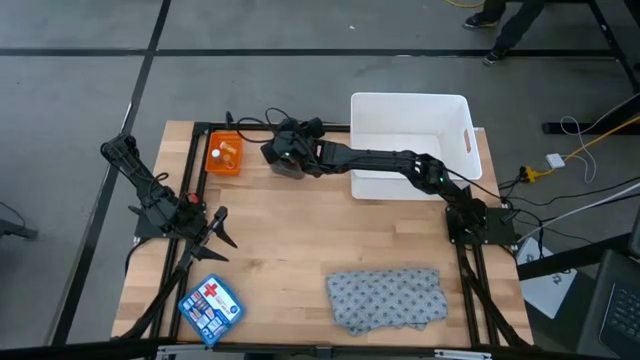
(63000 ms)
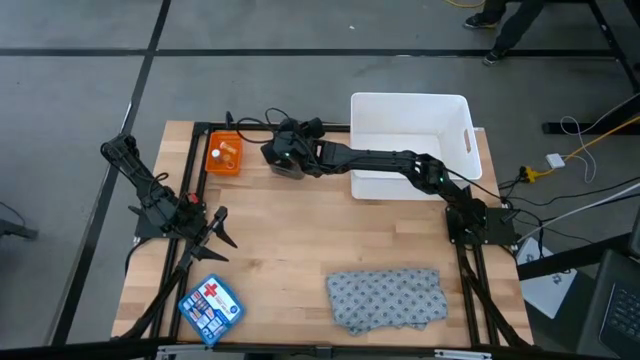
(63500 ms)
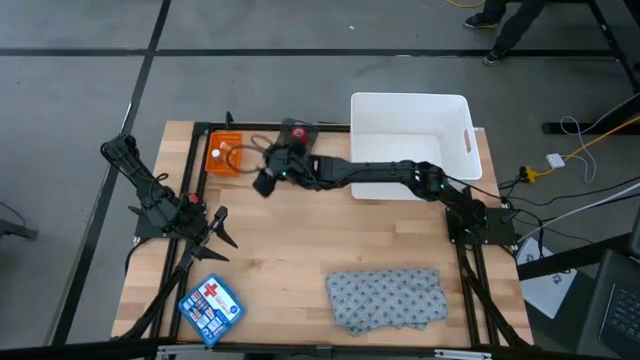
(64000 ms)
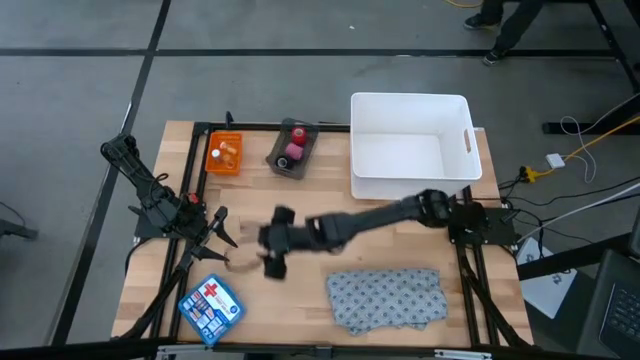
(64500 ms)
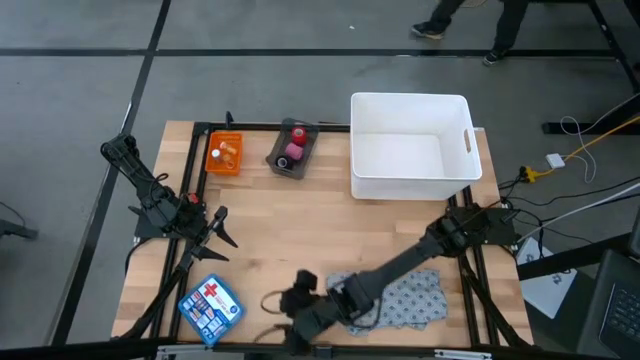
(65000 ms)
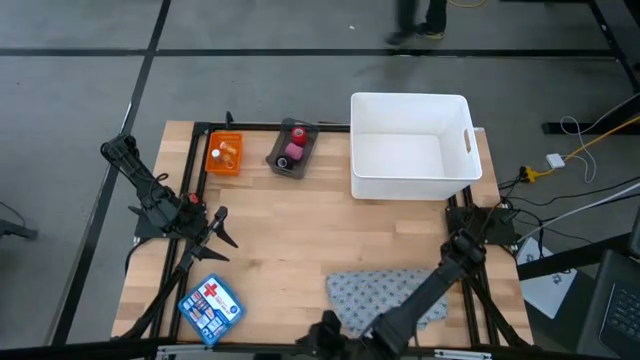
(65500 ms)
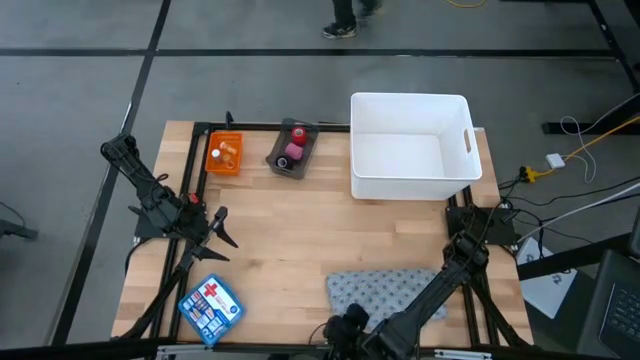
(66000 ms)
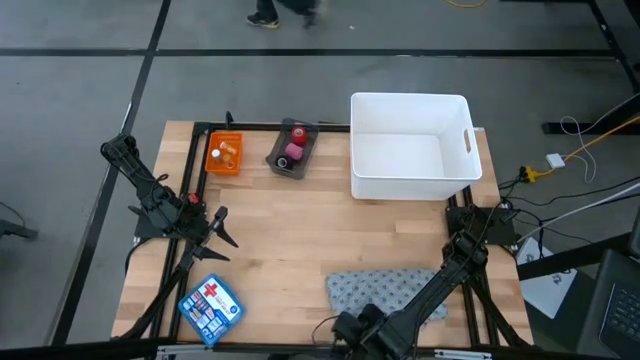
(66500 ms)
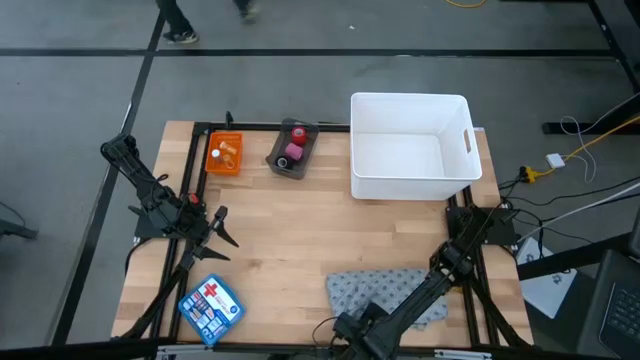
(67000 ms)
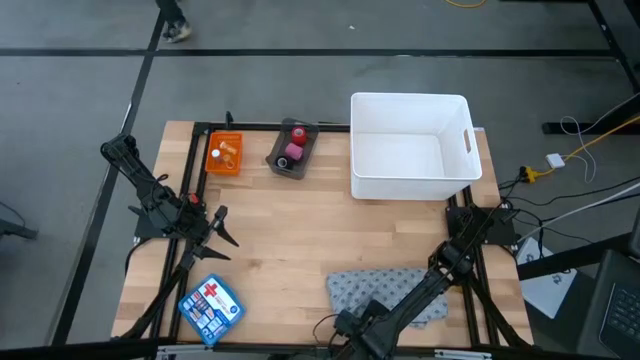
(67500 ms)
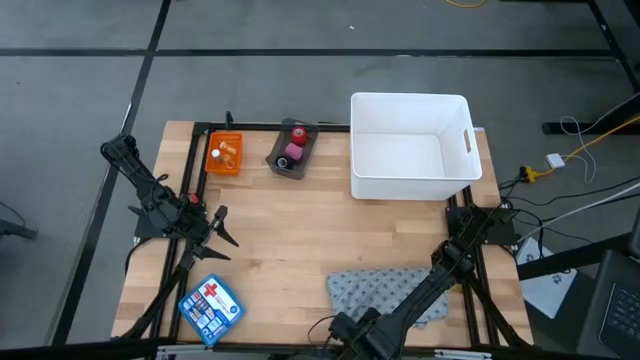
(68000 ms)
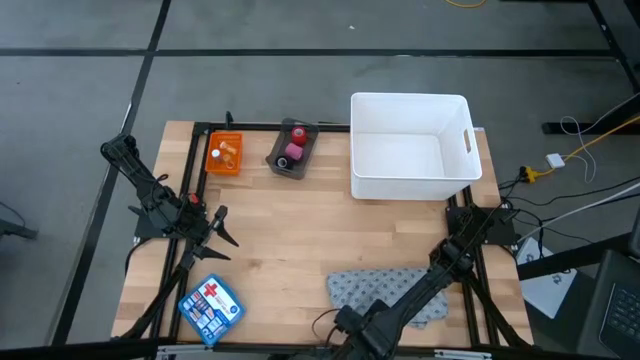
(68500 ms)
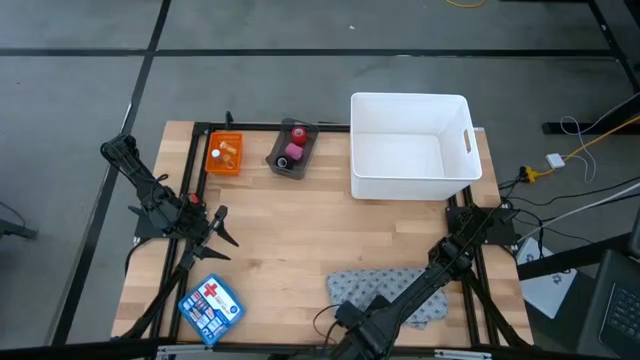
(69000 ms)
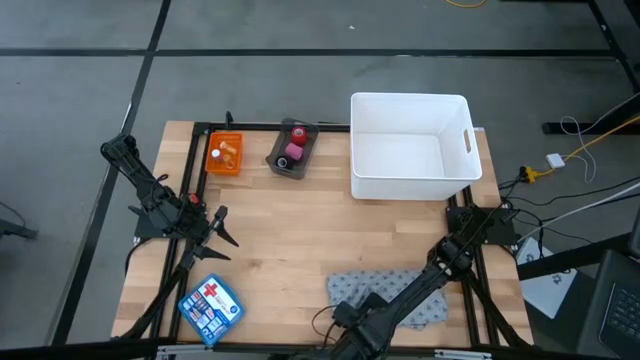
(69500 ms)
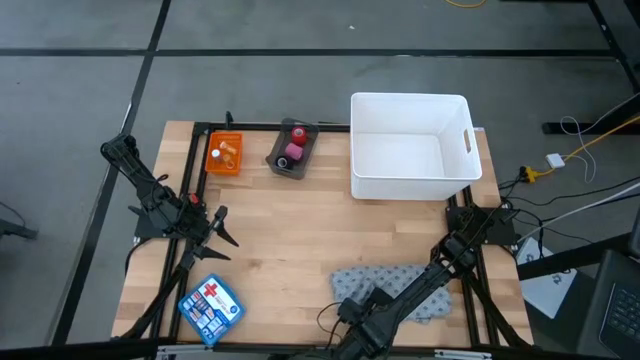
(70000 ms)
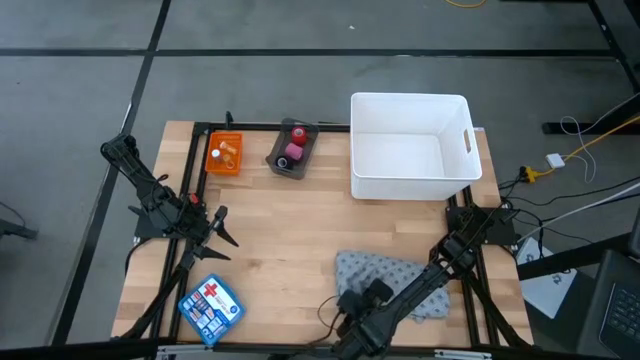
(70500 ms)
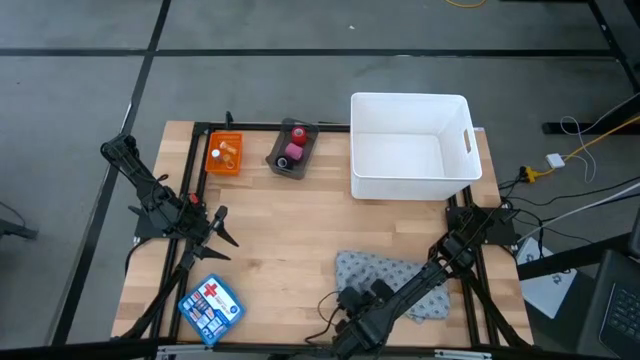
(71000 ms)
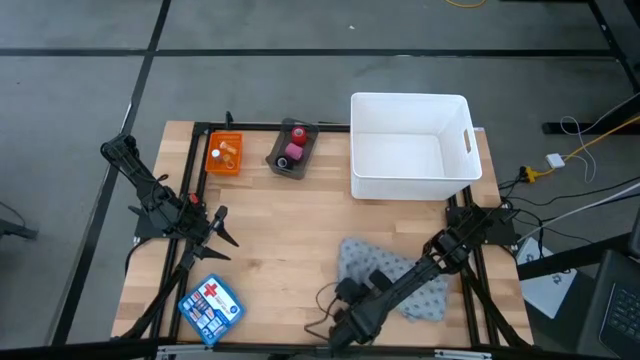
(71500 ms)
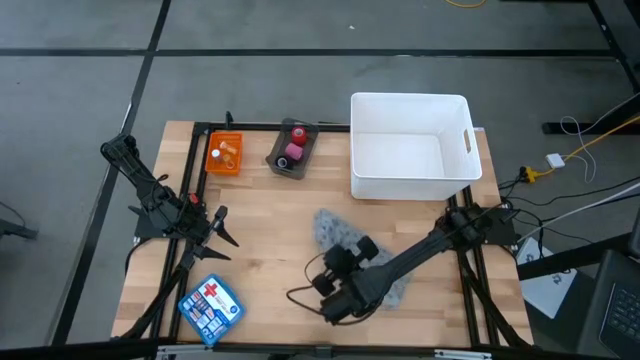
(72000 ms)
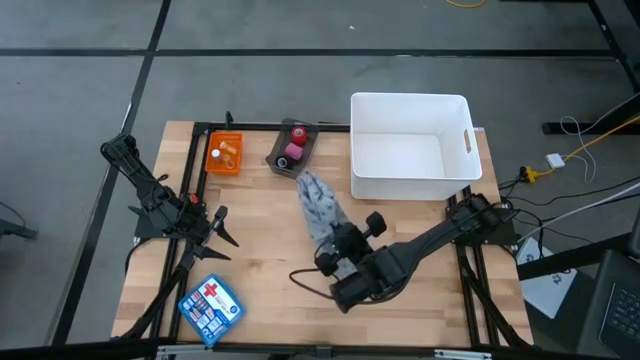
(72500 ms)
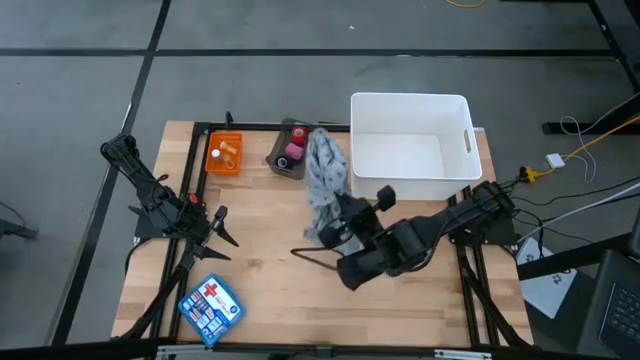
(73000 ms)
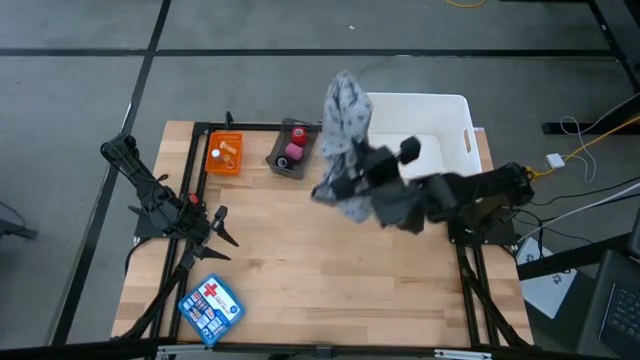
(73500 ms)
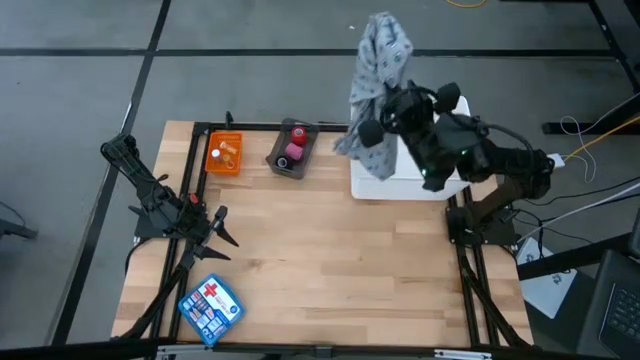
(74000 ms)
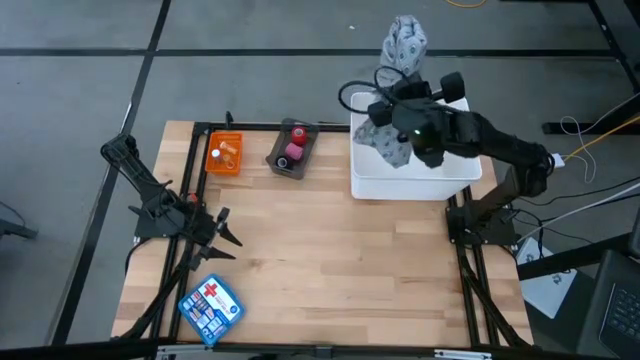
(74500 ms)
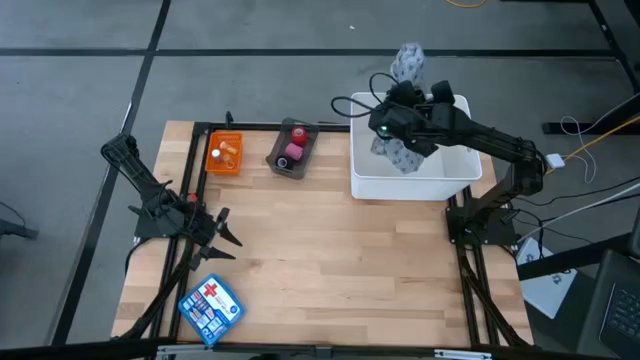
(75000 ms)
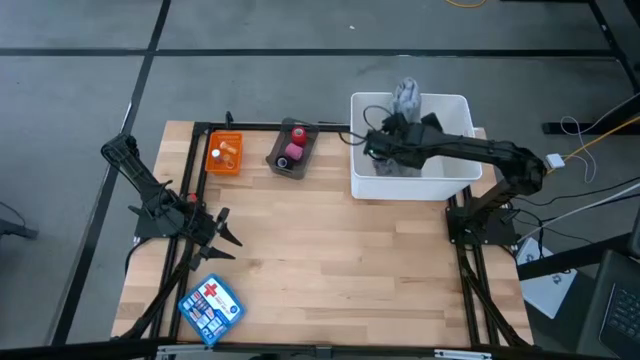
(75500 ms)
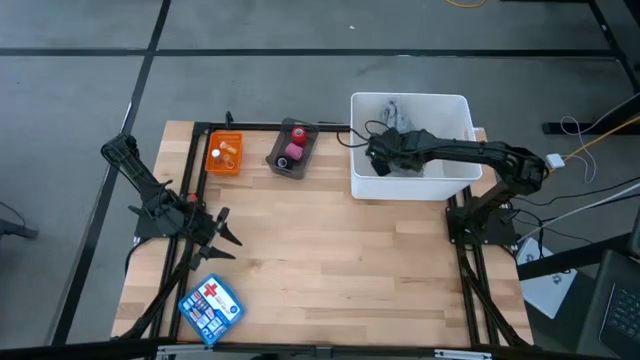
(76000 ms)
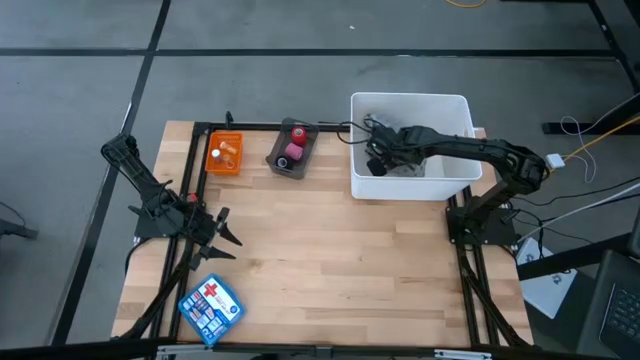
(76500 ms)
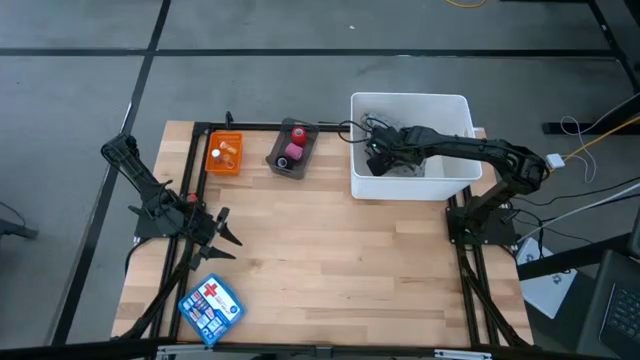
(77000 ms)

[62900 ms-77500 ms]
Task: Pick & place medical supplies in basket/bin
Put the blue patient gown into the white bin

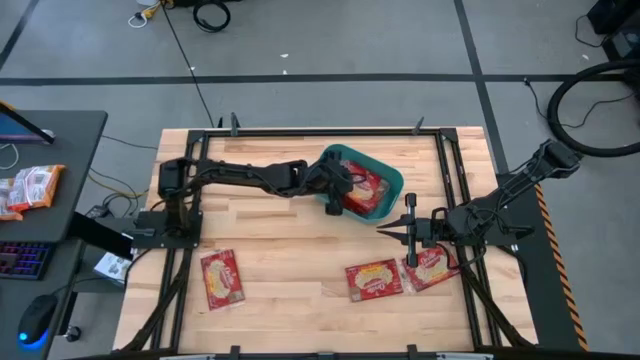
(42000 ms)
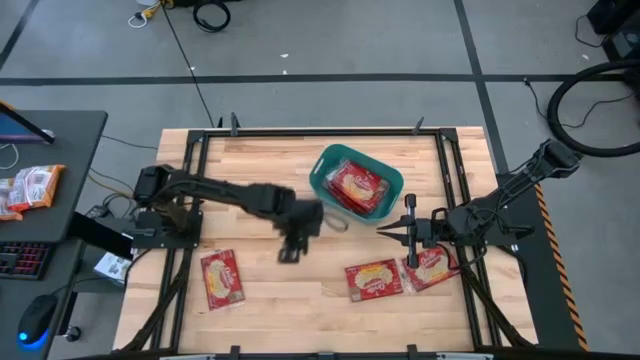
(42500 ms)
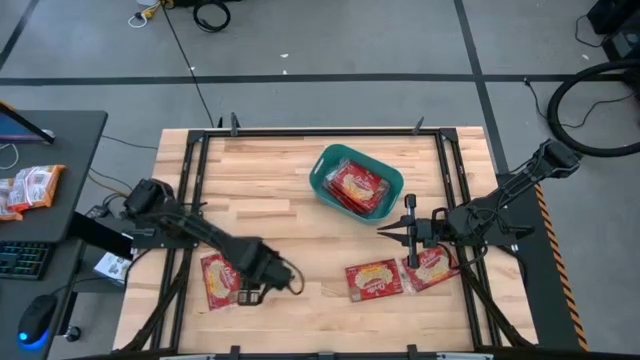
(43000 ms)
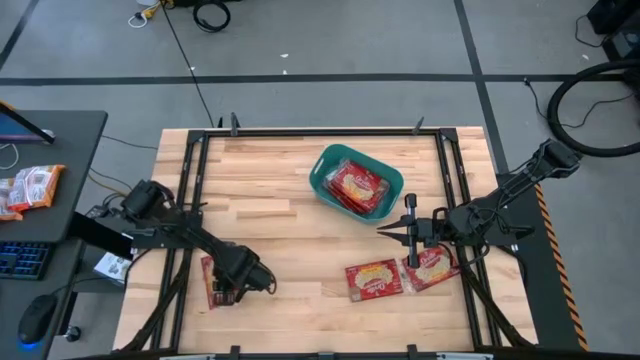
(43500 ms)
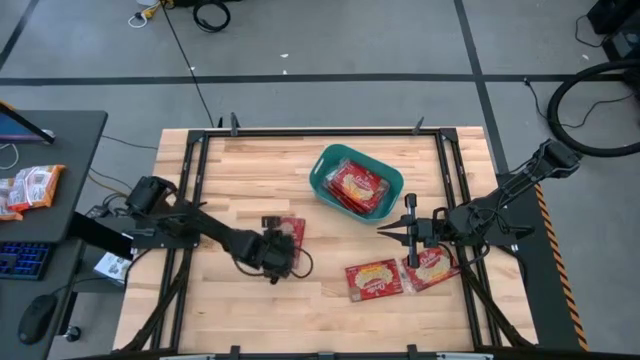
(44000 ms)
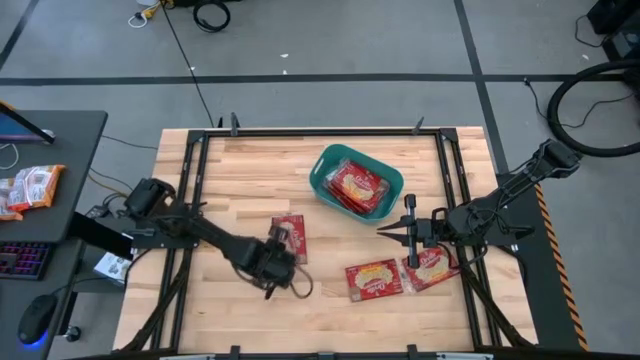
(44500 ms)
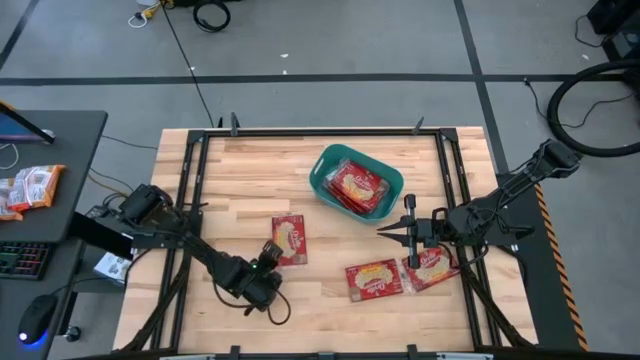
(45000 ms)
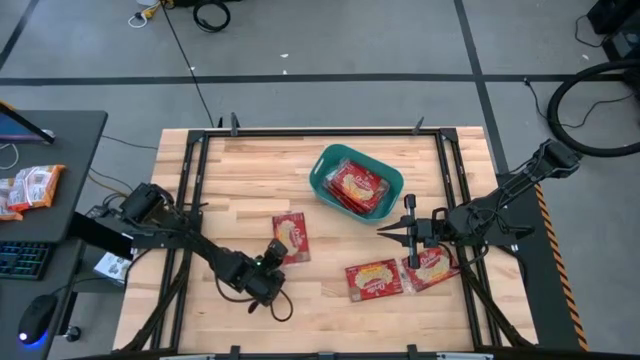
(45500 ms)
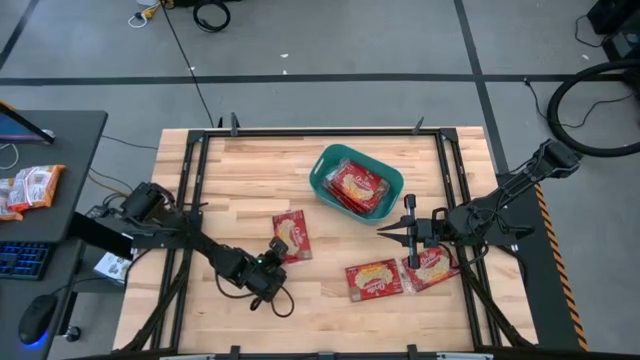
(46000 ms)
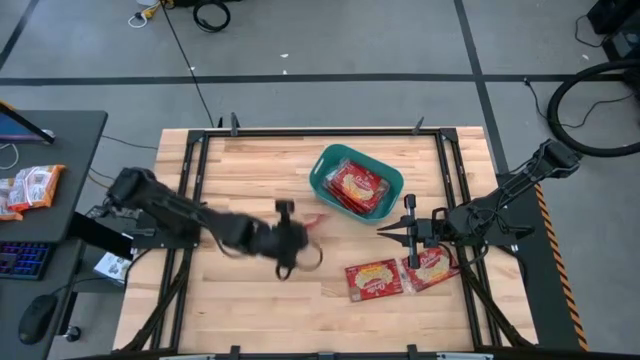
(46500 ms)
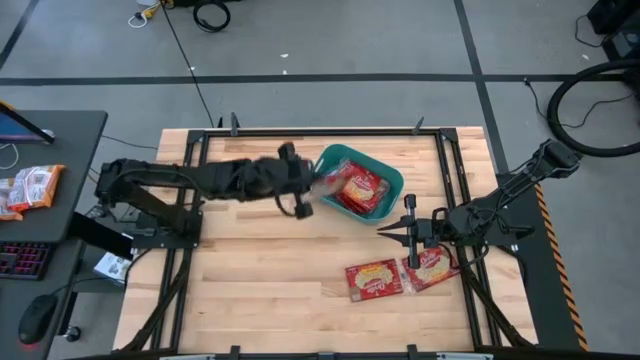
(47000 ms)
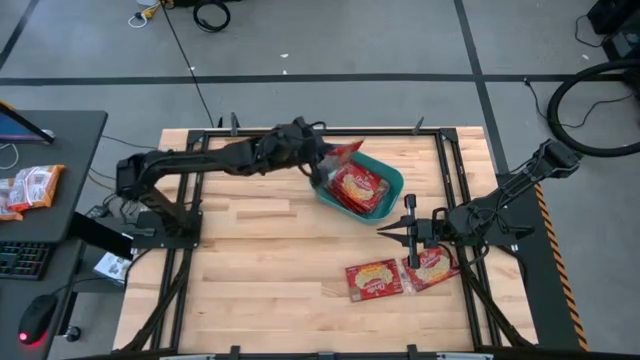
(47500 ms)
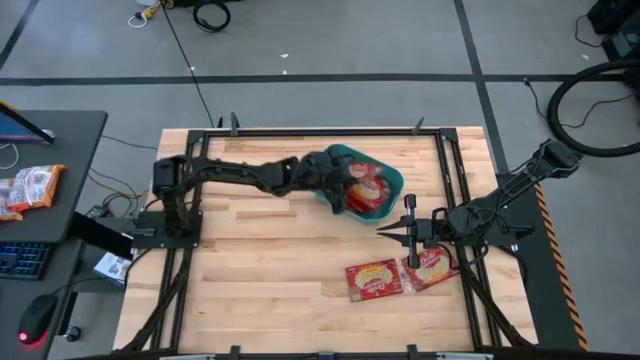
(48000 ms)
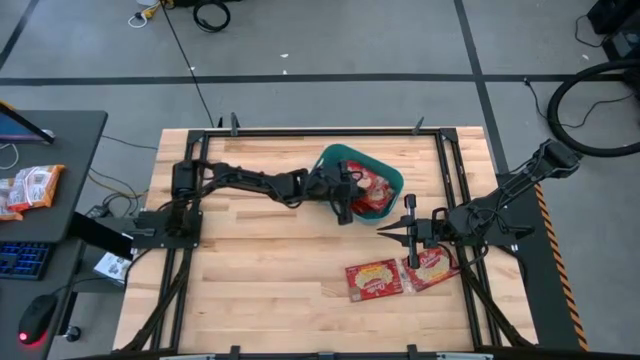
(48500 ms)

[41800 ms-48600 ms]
Task: Sort popcorn bags into baskets
Put the left red popcorn bag into the green bin

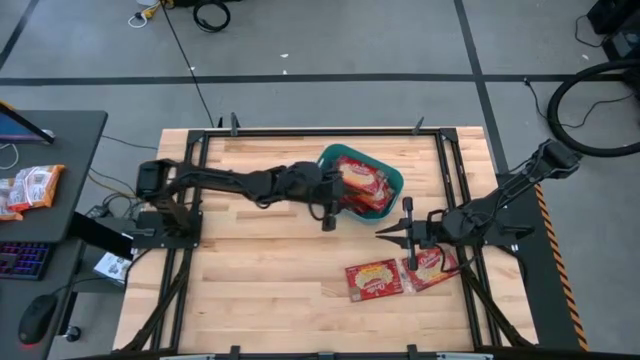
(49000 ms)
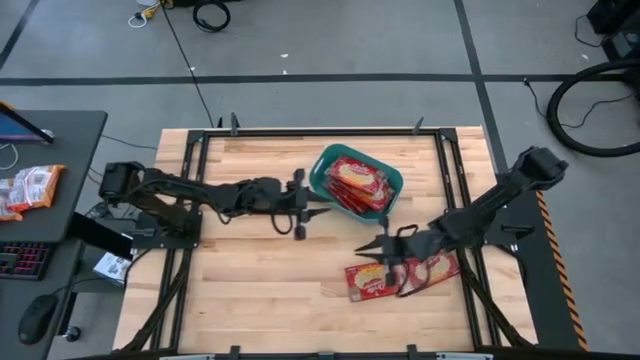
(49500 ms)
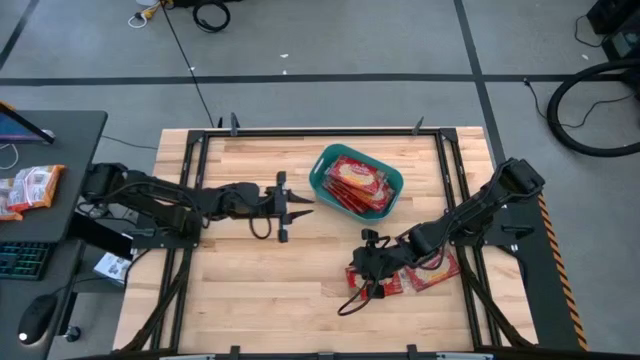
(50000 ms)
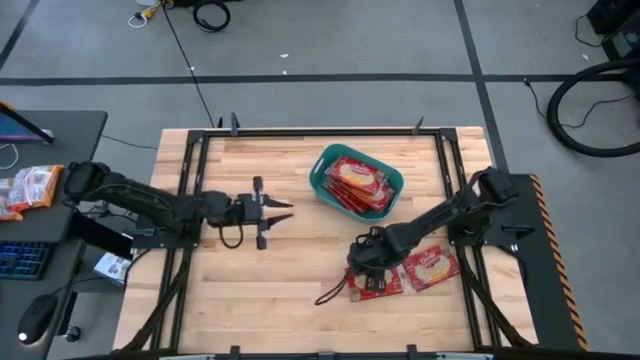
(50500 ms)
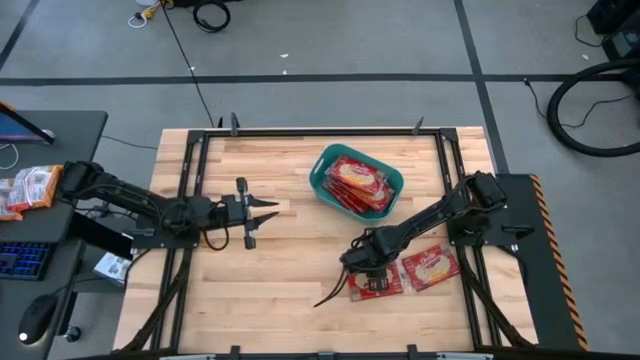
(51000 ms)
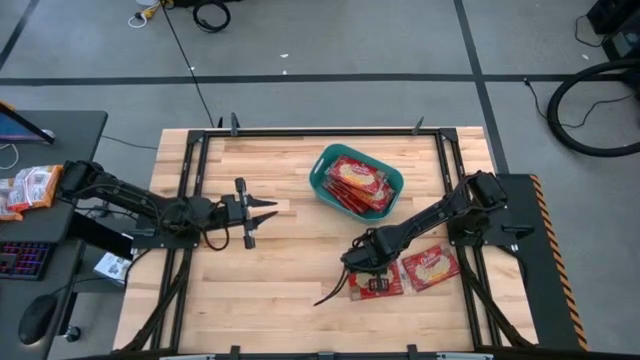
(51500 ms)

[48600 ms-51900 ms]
Put the left red popcorn bag into the green bin
